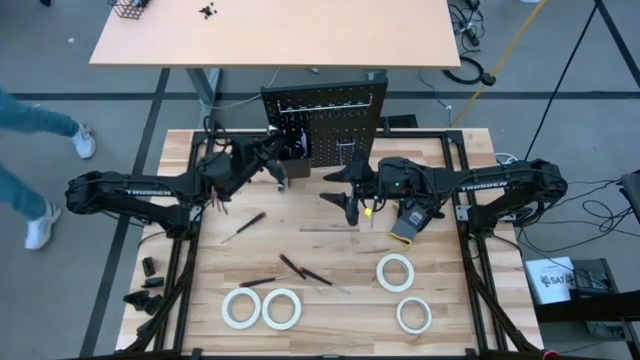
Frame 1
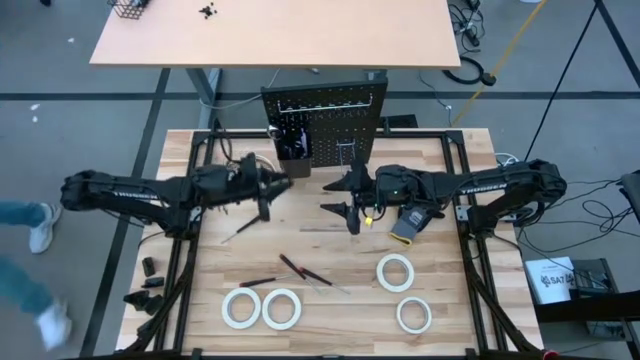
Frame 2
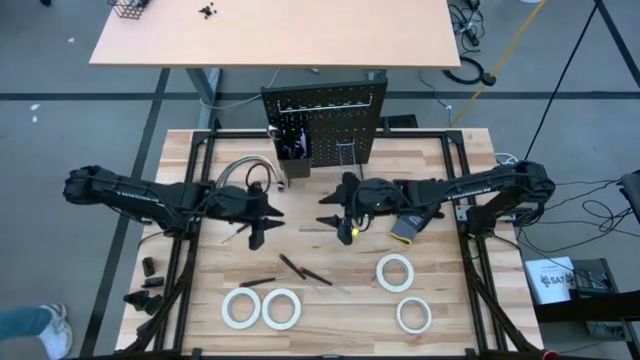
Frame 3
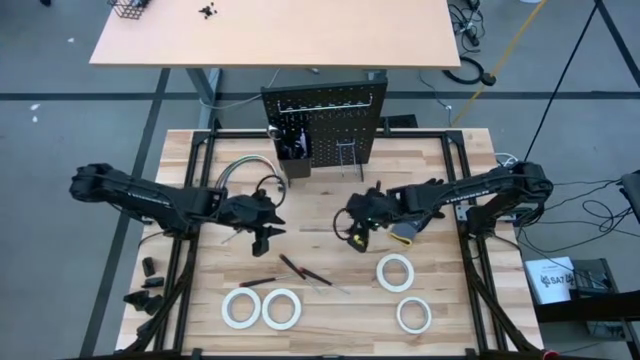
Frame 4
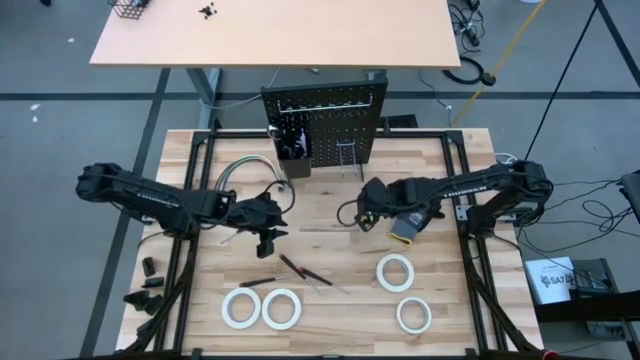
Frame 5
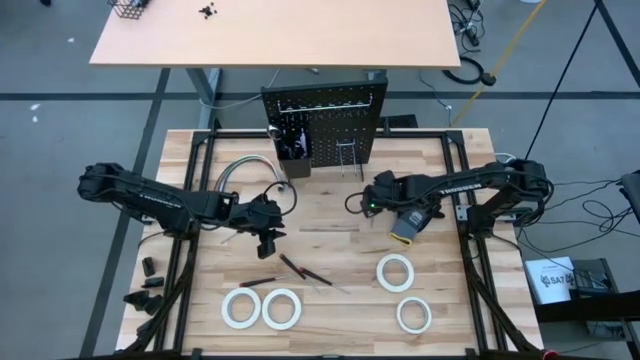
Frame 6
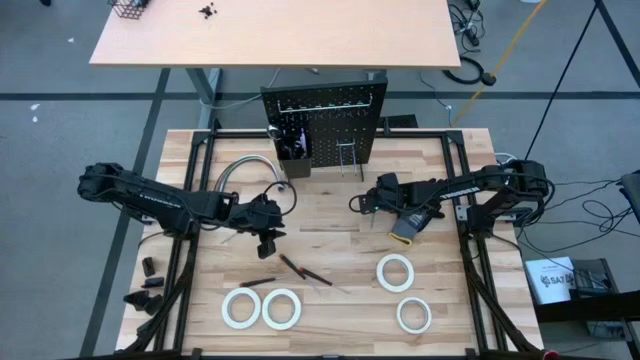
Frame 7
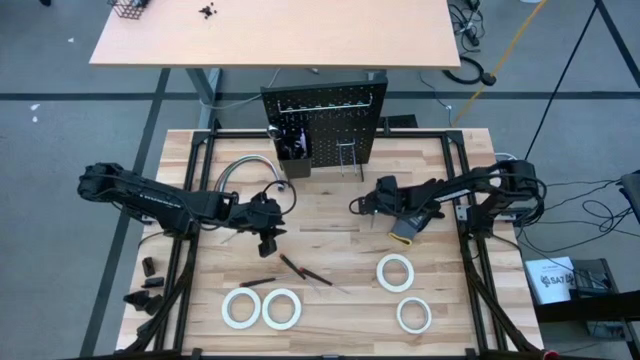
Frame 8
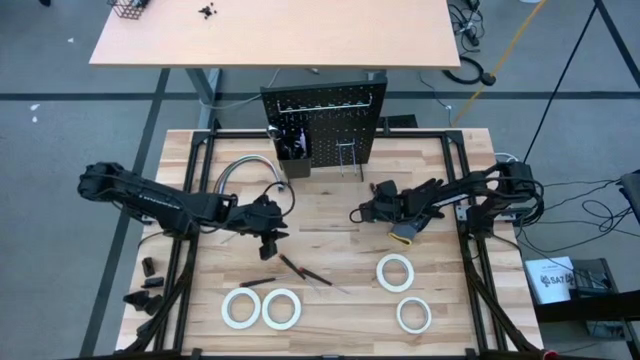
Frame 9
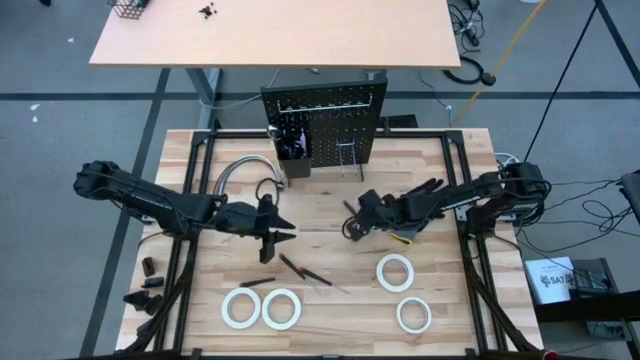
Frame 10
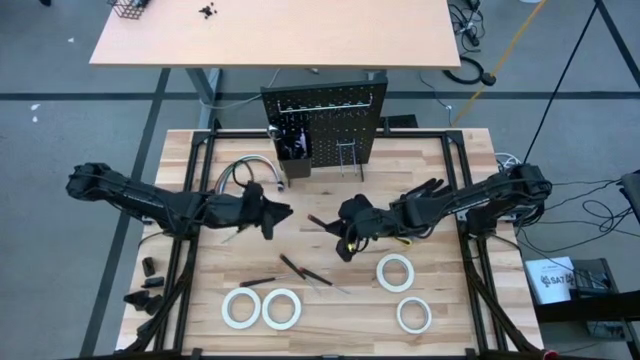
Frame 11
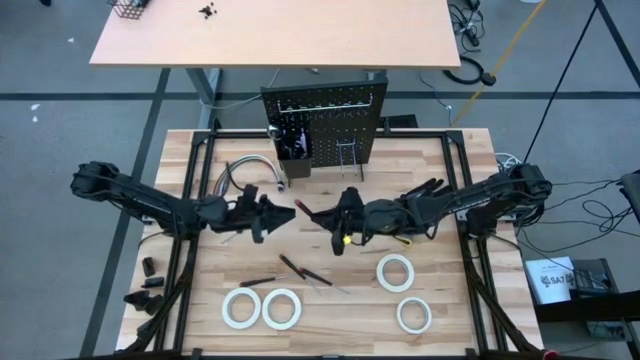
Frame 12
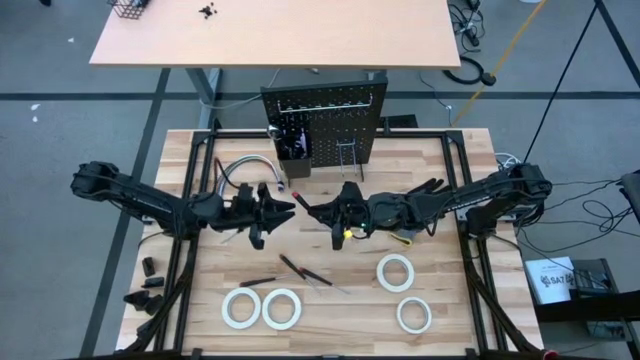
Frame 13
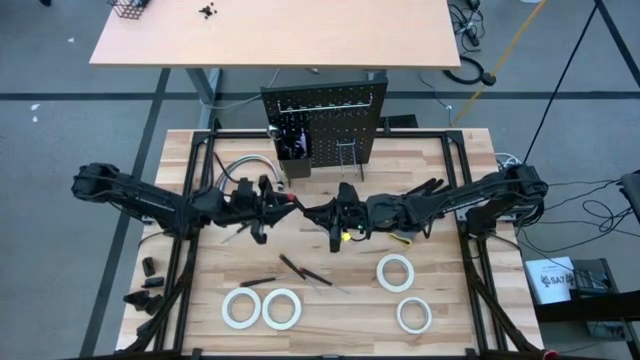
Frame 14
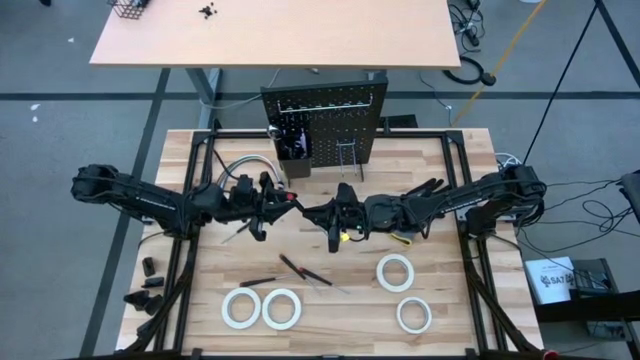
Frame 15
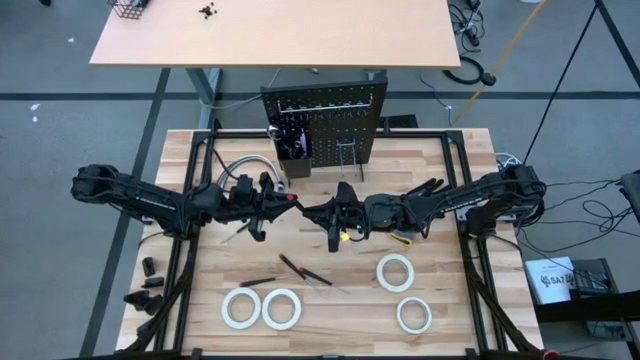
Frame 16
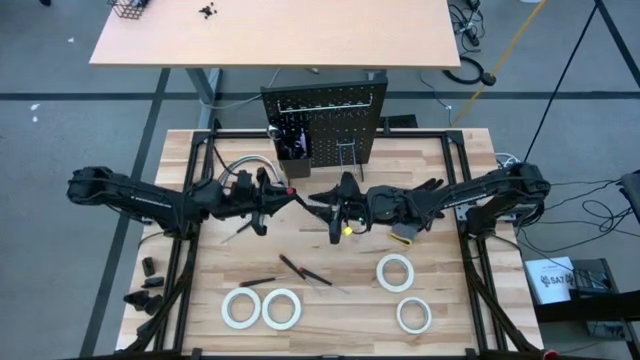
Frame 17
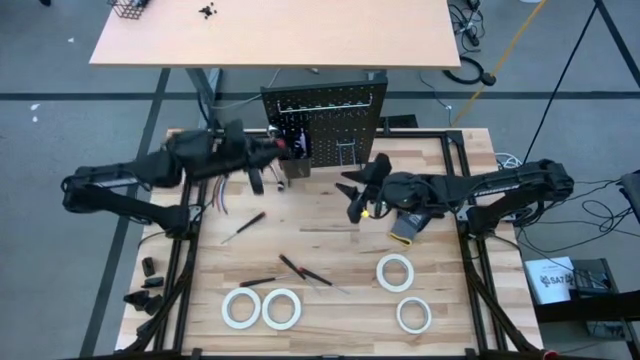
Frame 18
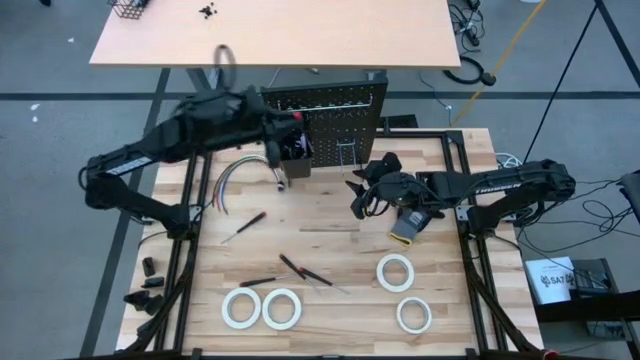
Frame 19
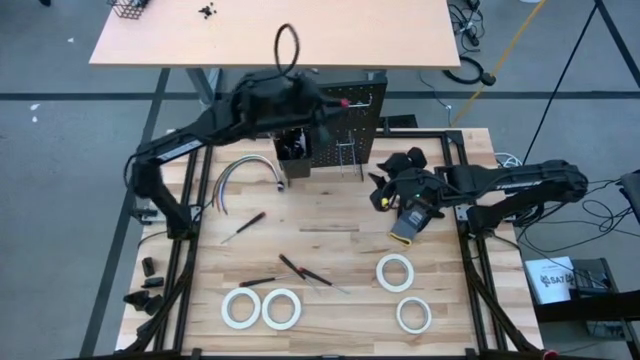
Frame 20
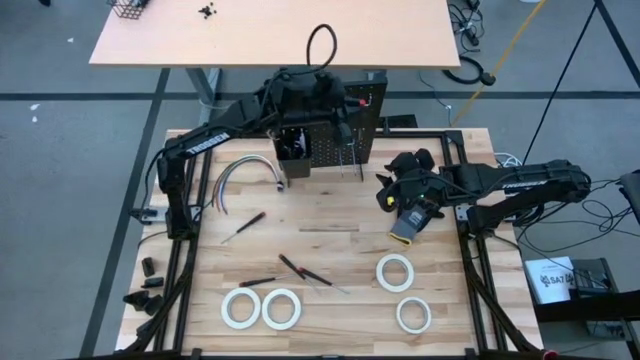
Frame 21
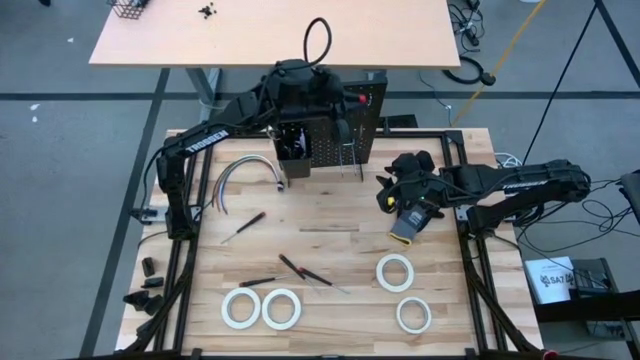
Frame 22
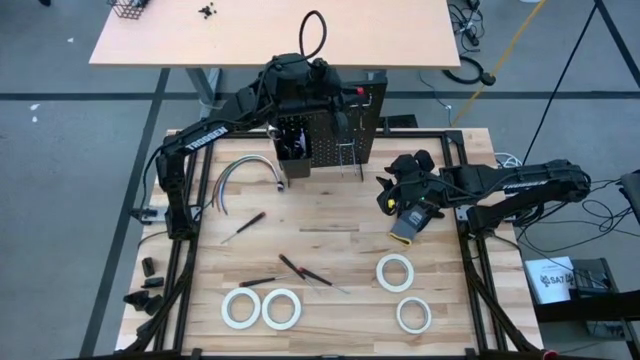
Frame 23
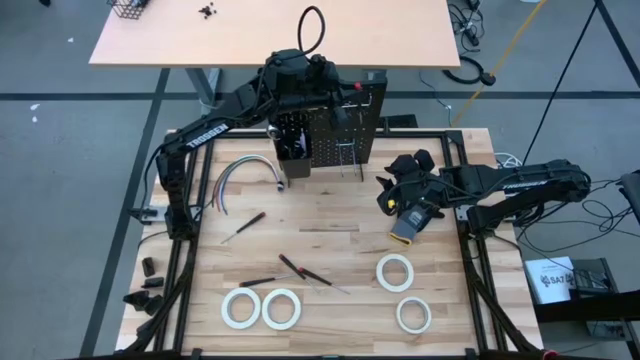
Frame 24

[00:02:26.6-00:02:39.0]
Task: Hang tools onto peg board
Hang the nut driver on the peg board

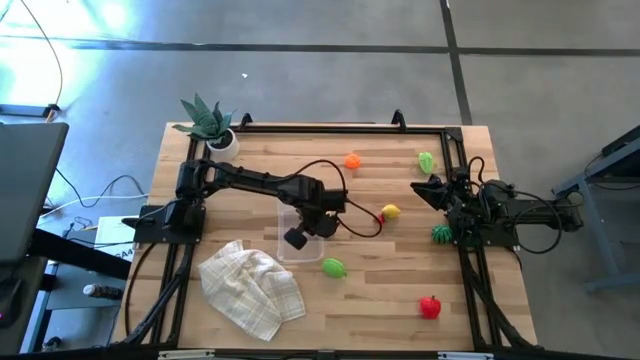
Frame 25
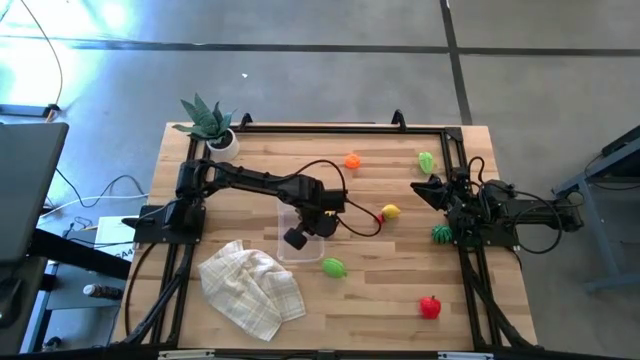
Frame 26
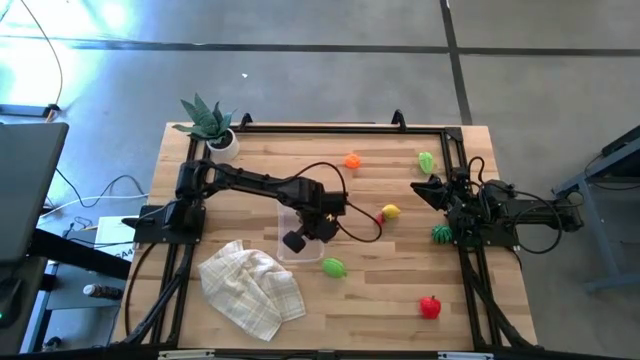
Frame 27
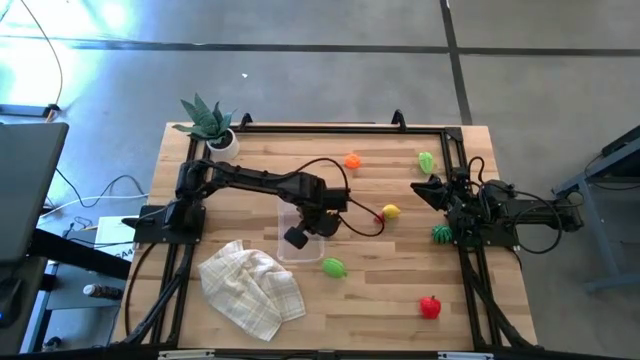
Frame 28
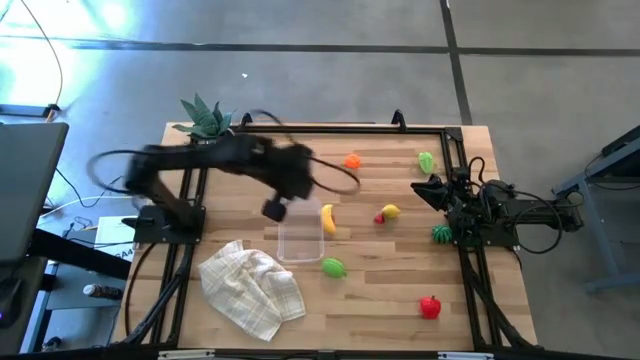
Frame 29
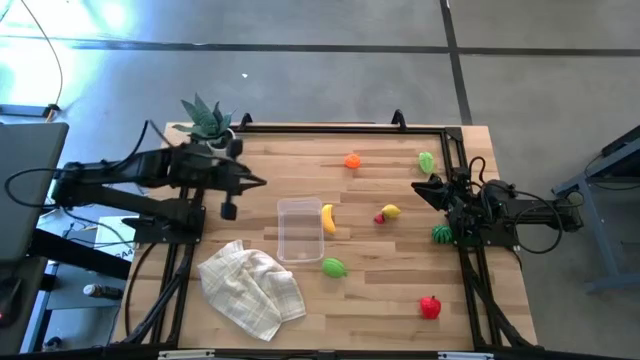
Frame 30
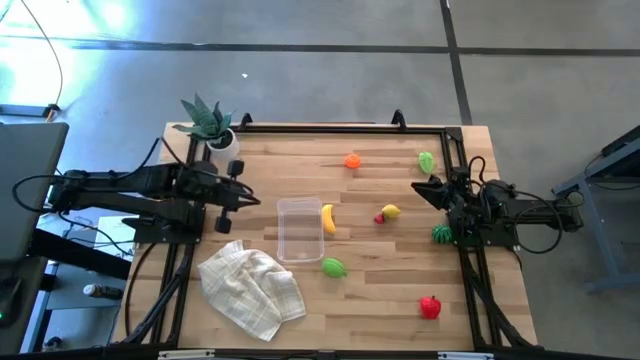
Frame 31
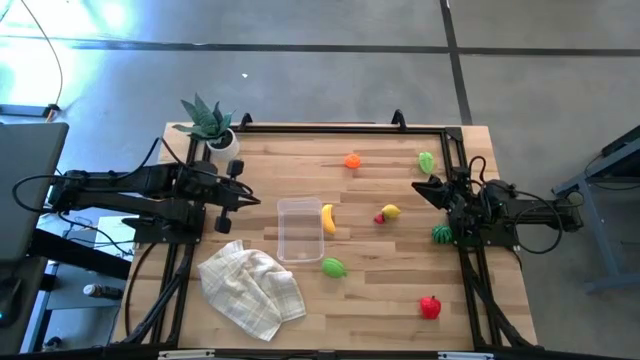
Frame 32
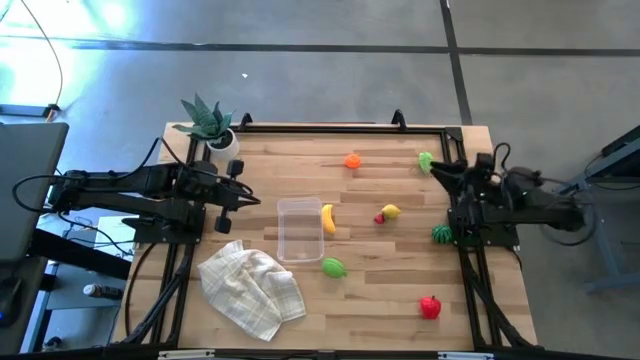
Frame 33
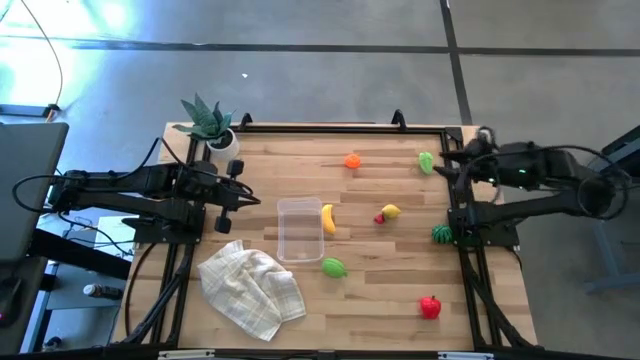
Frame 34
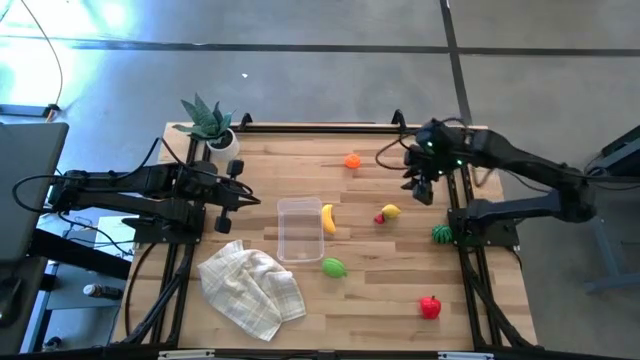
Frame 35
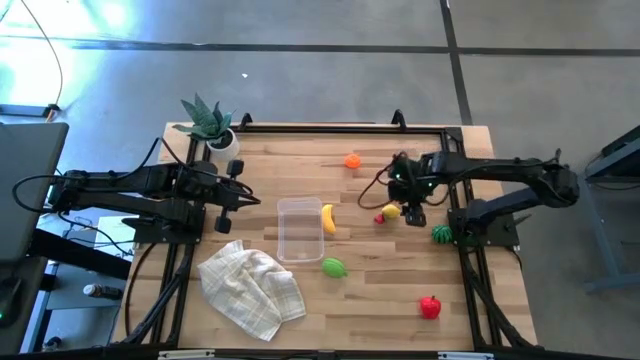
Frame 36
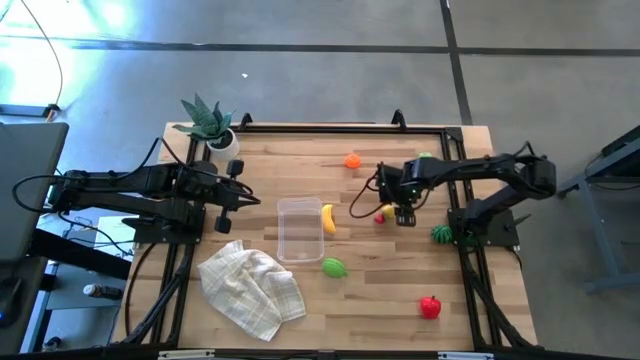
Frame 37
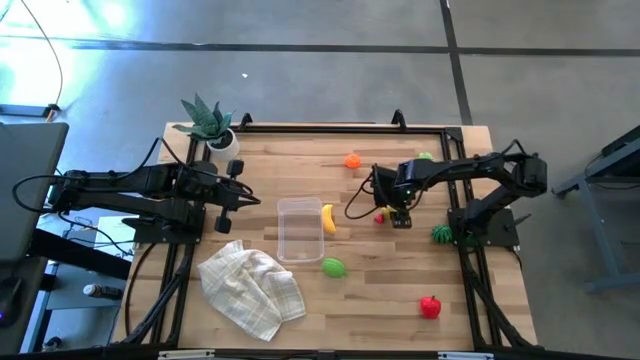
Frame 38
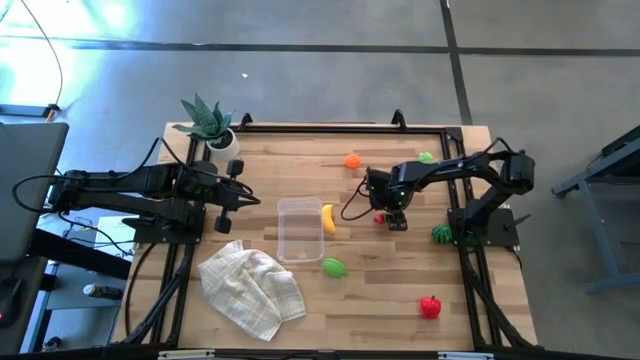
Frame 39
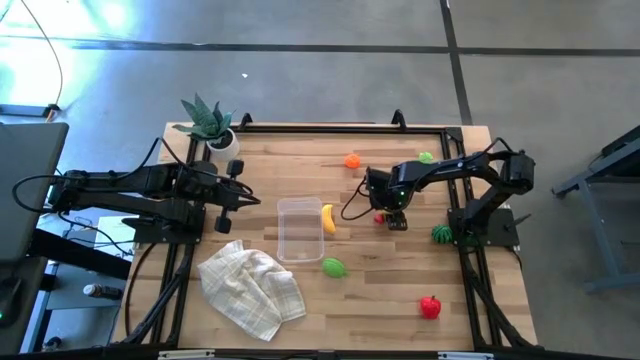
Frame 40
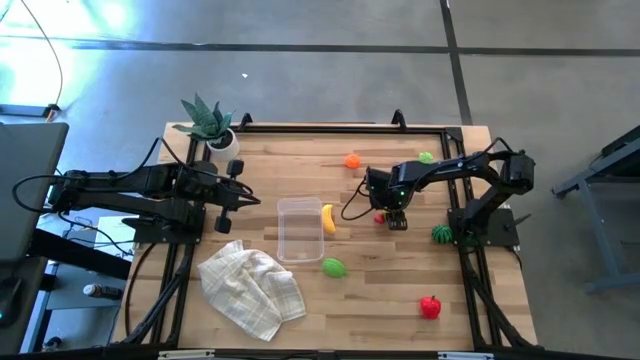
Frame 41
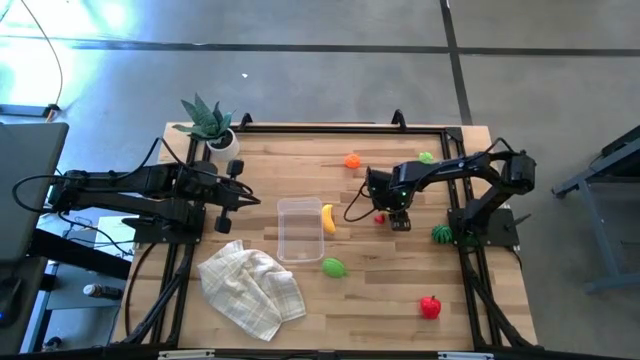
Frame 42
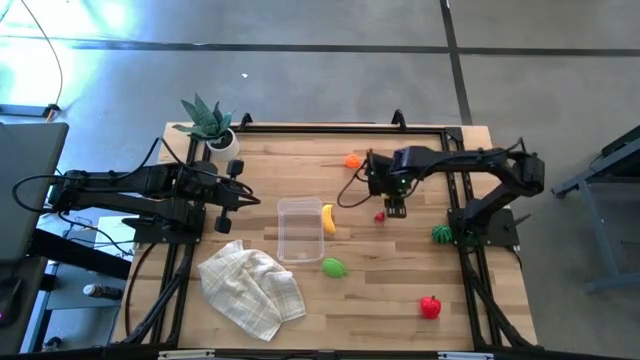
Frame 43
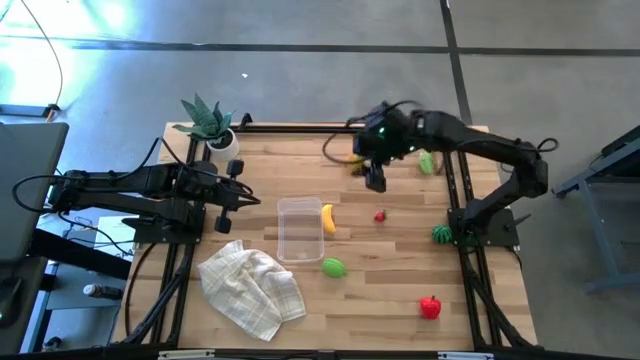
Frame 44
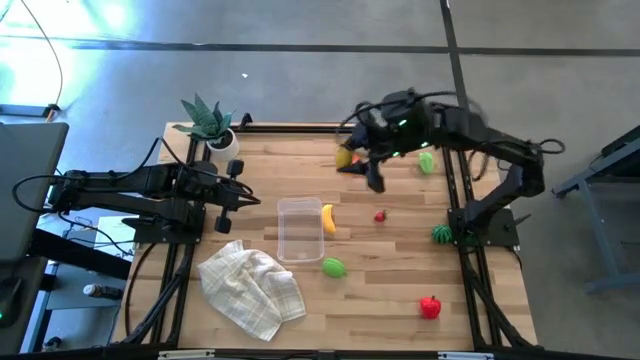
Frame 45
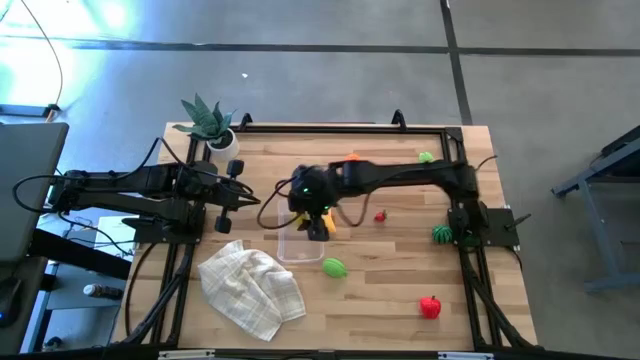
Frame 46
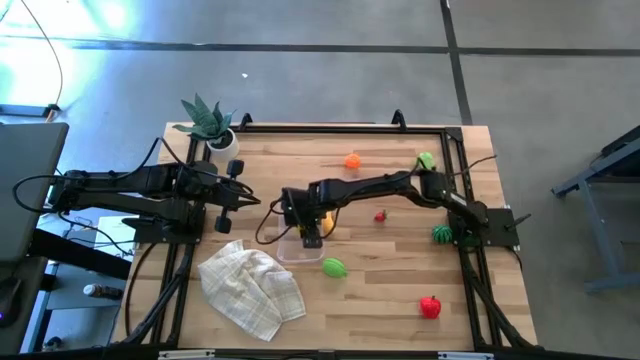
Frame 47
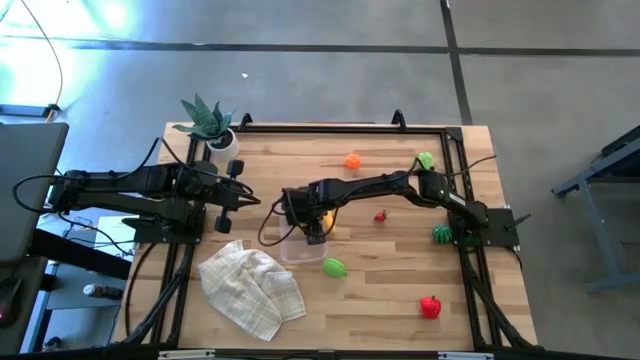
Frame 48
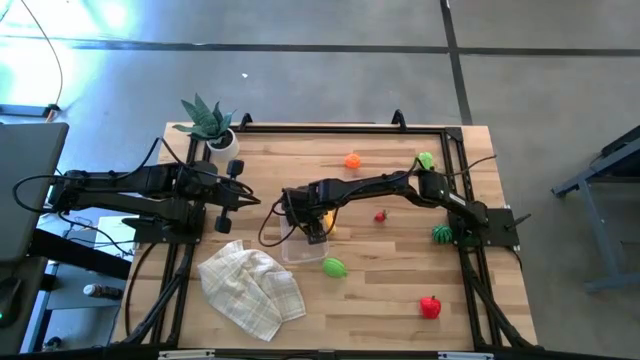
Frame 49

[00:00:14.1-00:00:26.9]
Task: Pick and placing Produce into tupperware
Put the yellow lemon into the transparent bin
